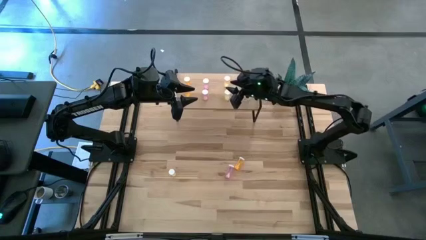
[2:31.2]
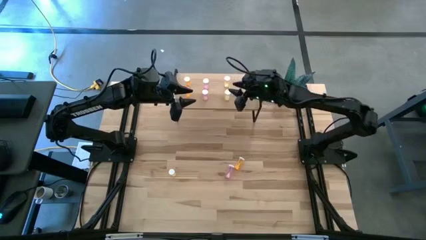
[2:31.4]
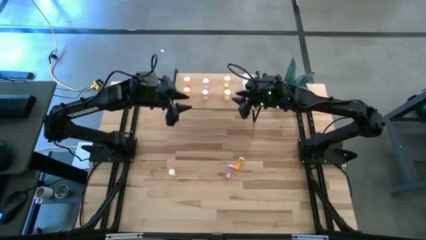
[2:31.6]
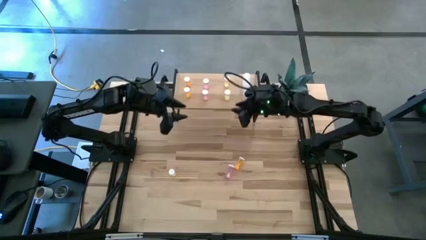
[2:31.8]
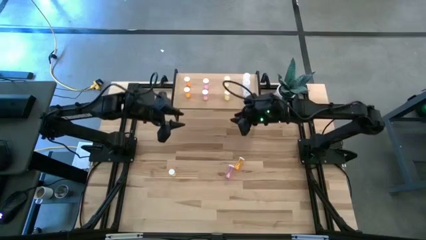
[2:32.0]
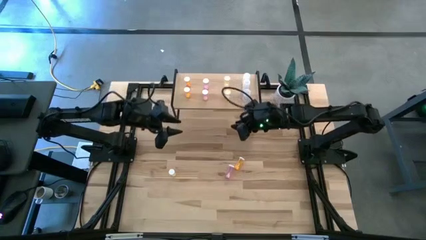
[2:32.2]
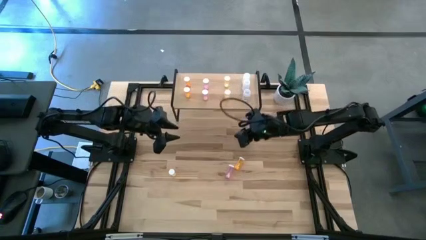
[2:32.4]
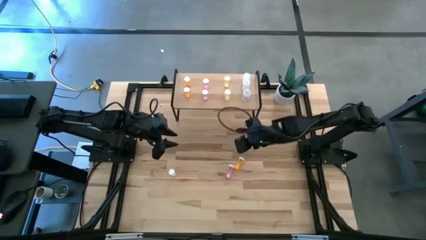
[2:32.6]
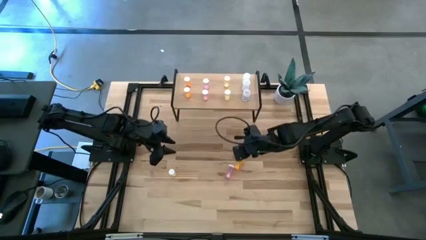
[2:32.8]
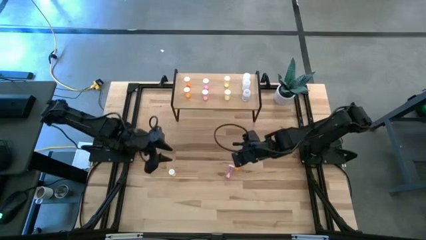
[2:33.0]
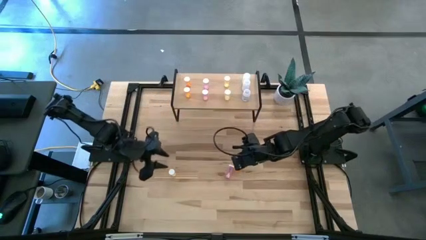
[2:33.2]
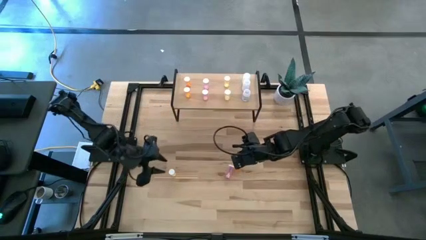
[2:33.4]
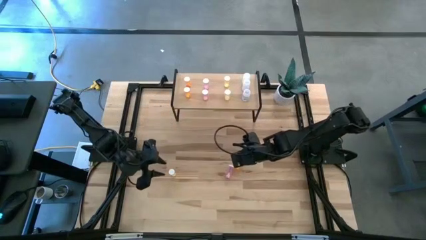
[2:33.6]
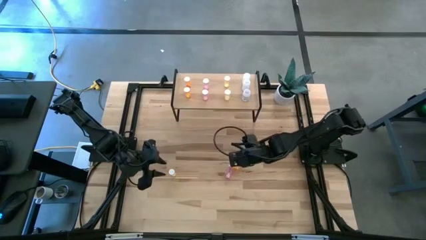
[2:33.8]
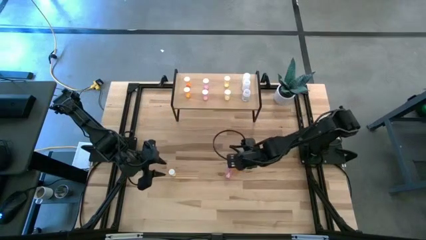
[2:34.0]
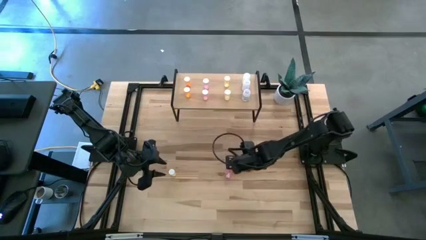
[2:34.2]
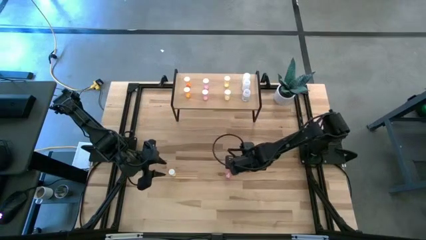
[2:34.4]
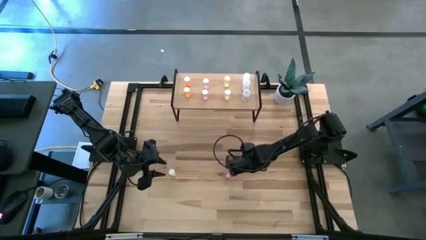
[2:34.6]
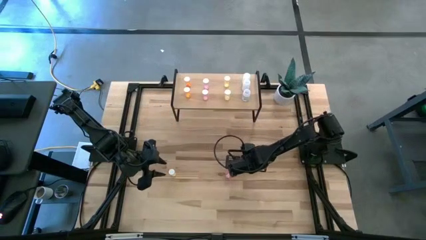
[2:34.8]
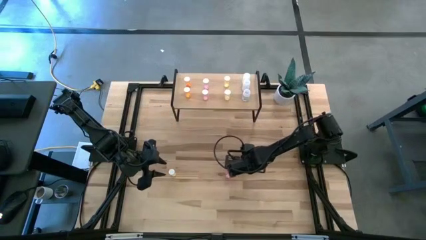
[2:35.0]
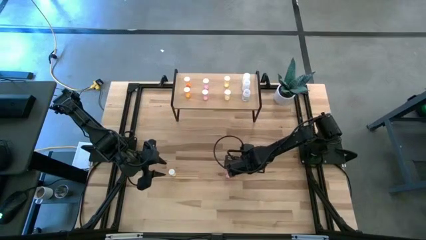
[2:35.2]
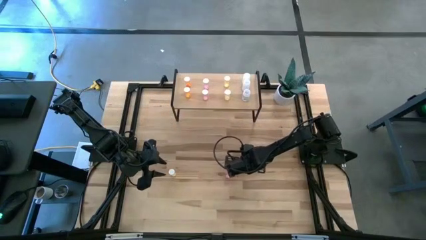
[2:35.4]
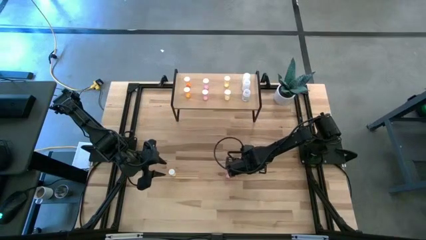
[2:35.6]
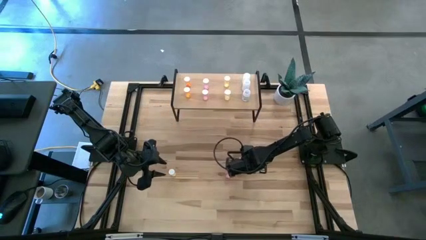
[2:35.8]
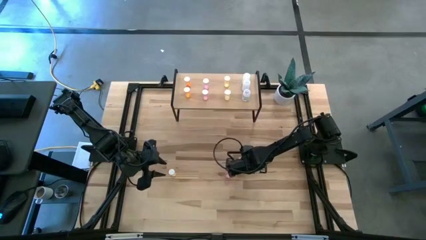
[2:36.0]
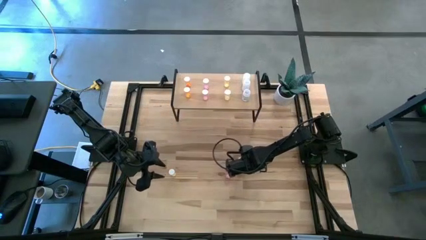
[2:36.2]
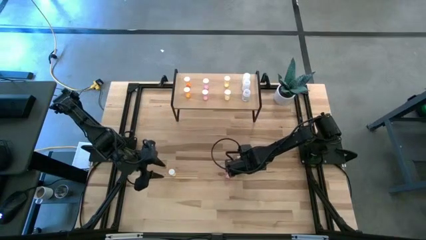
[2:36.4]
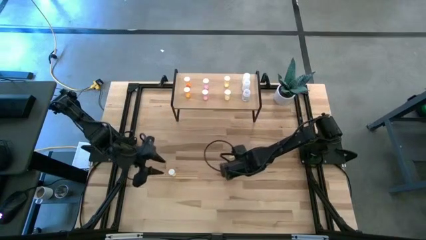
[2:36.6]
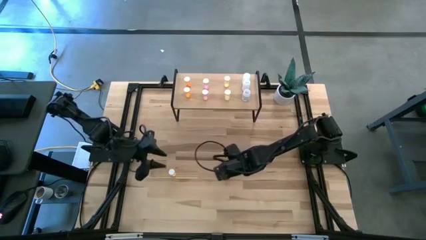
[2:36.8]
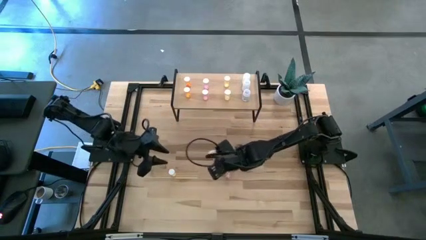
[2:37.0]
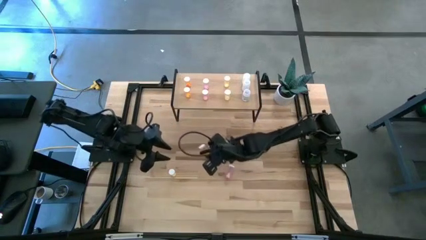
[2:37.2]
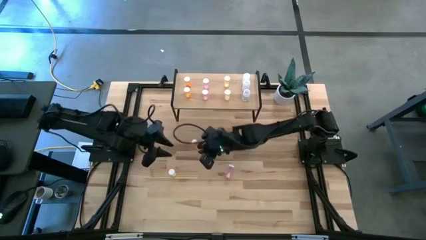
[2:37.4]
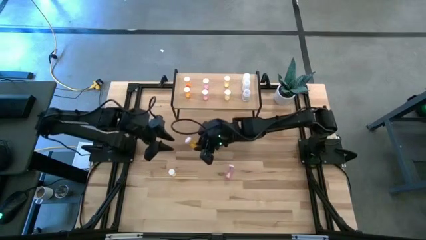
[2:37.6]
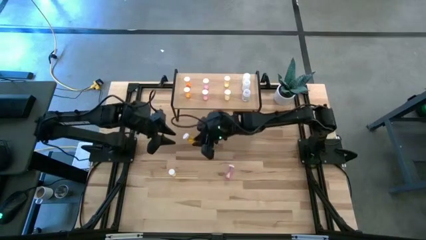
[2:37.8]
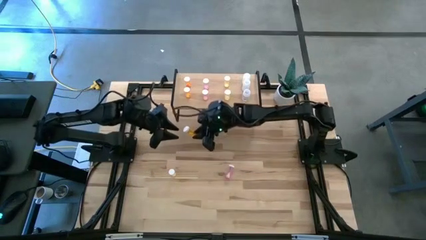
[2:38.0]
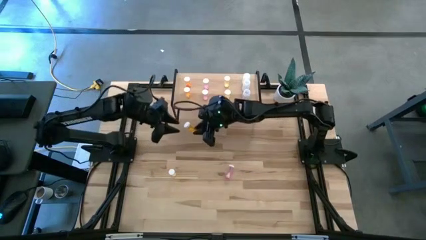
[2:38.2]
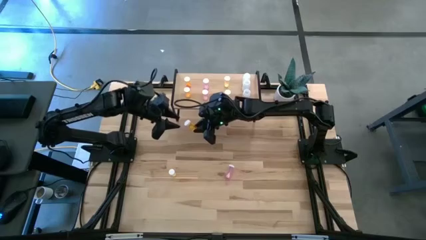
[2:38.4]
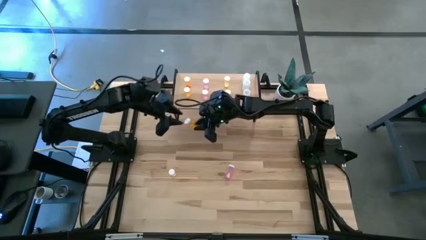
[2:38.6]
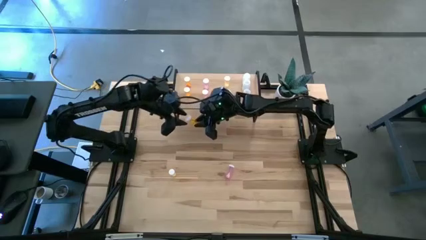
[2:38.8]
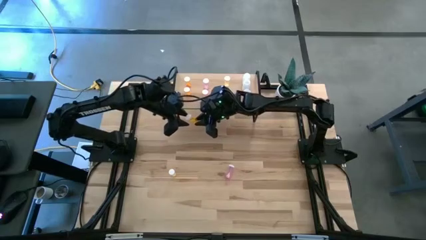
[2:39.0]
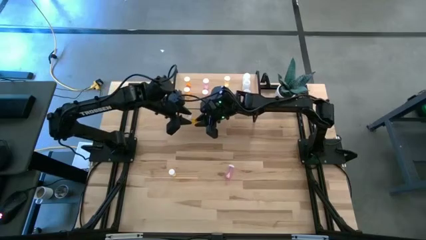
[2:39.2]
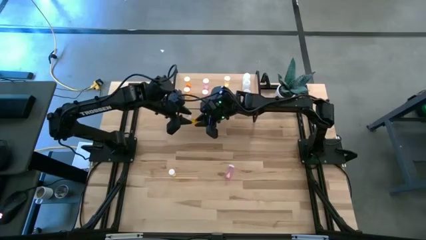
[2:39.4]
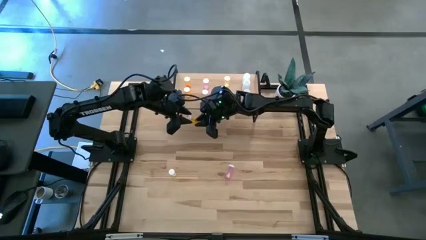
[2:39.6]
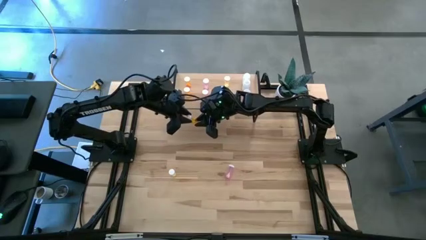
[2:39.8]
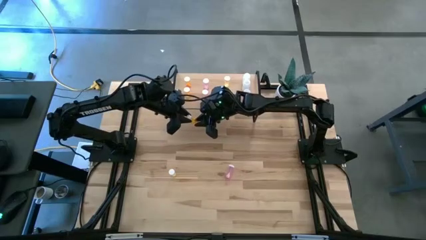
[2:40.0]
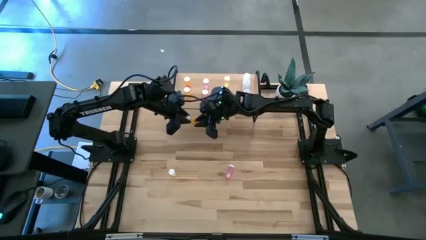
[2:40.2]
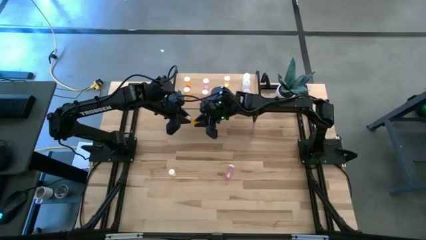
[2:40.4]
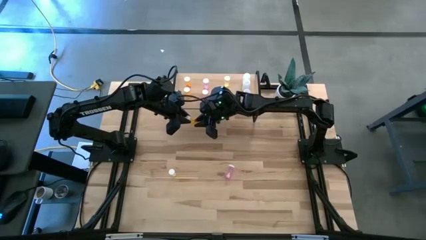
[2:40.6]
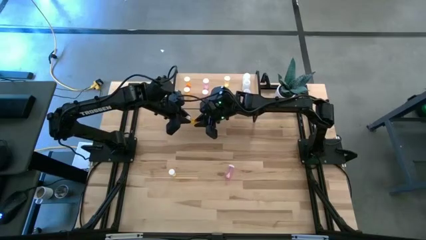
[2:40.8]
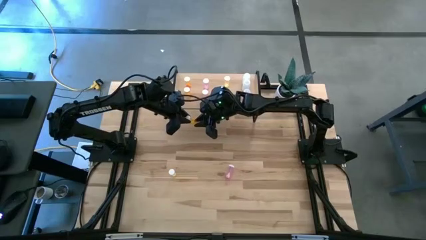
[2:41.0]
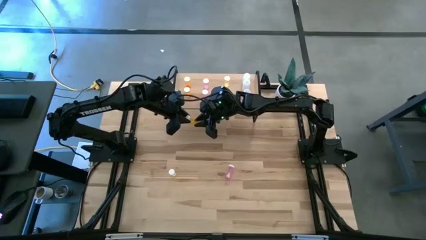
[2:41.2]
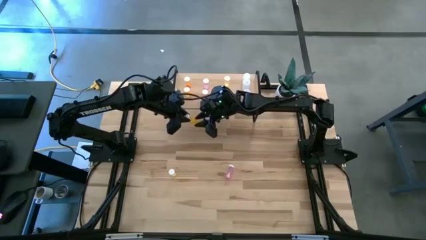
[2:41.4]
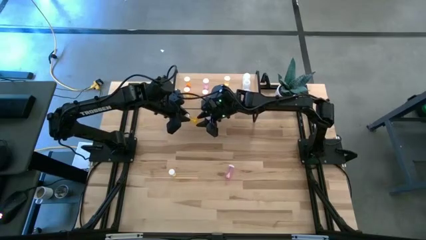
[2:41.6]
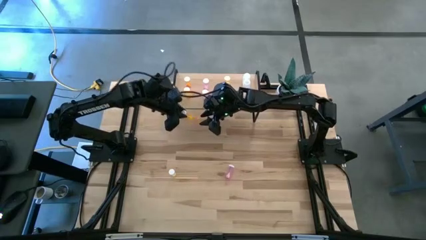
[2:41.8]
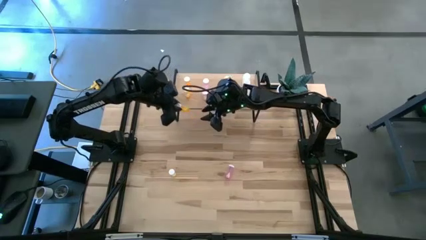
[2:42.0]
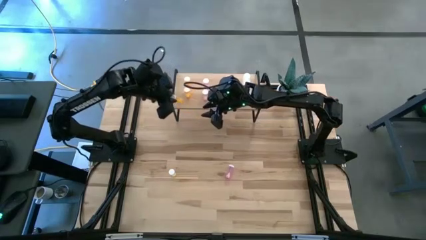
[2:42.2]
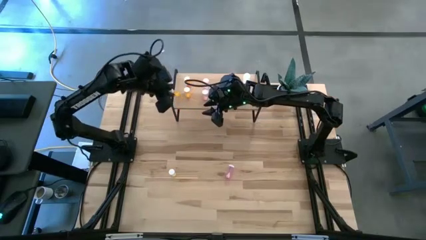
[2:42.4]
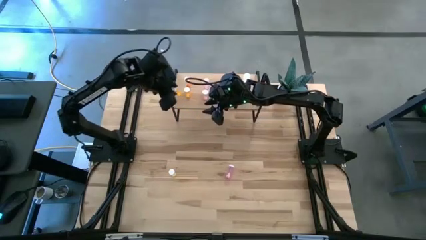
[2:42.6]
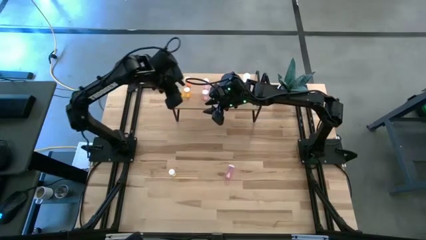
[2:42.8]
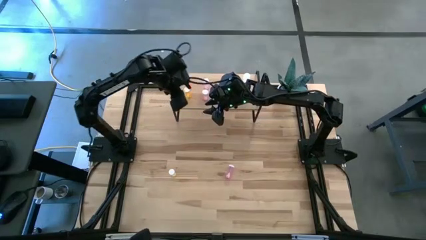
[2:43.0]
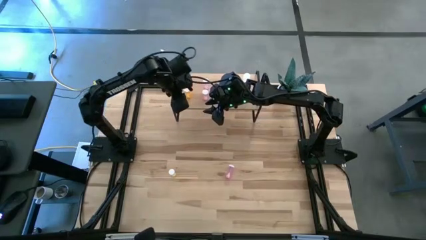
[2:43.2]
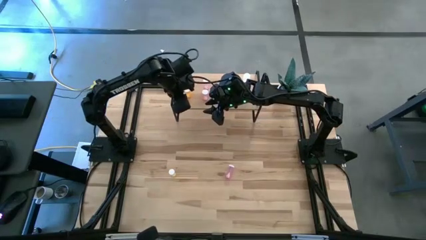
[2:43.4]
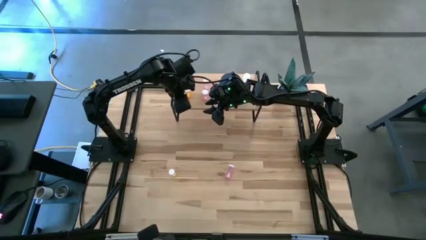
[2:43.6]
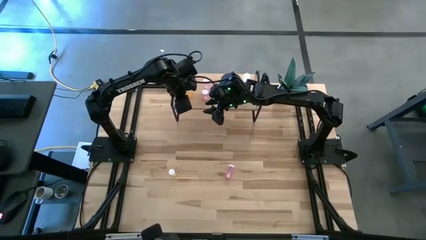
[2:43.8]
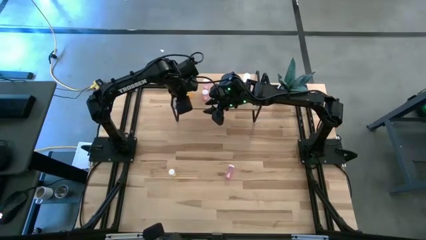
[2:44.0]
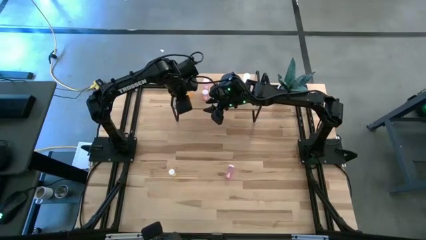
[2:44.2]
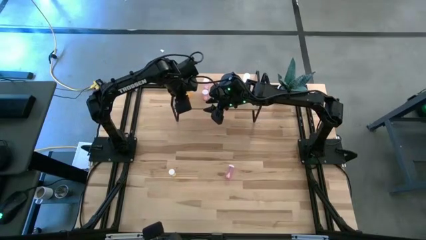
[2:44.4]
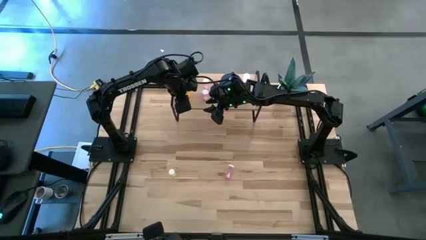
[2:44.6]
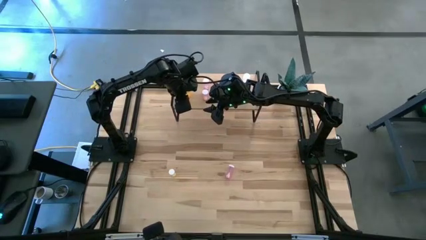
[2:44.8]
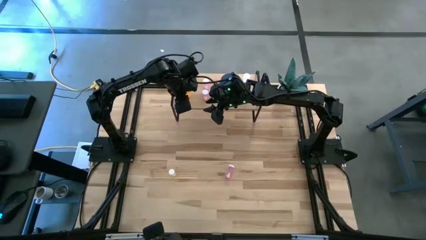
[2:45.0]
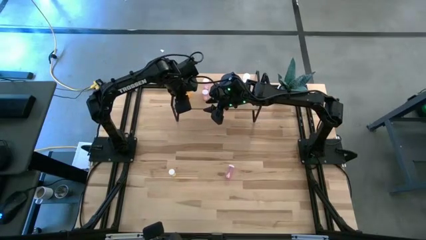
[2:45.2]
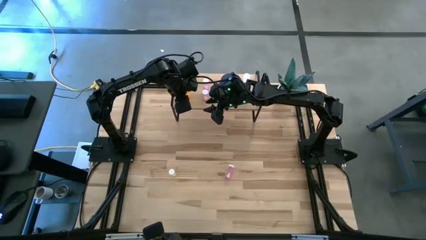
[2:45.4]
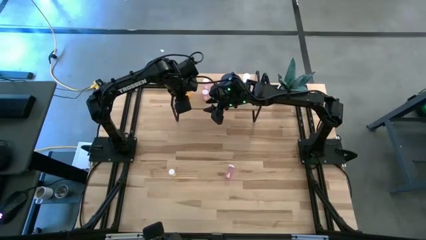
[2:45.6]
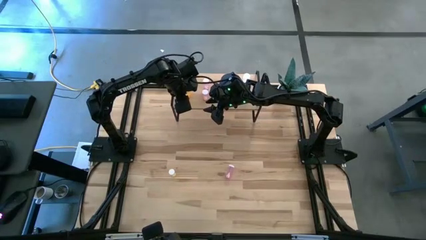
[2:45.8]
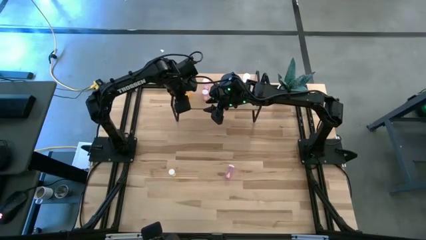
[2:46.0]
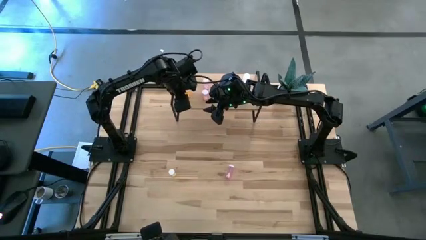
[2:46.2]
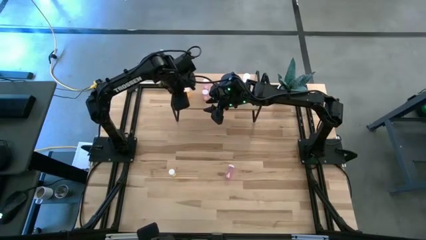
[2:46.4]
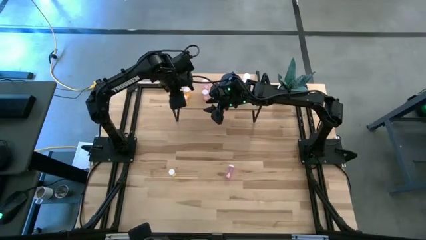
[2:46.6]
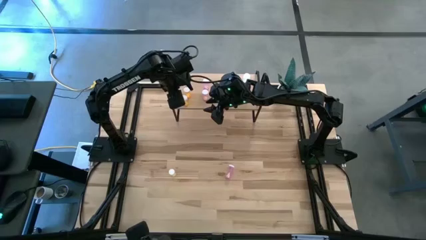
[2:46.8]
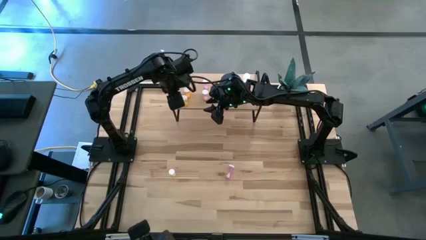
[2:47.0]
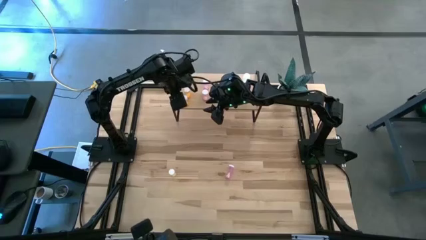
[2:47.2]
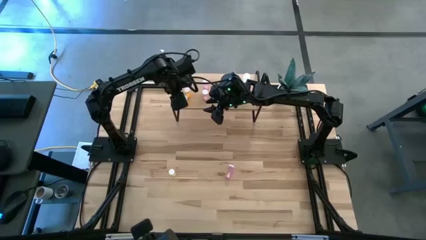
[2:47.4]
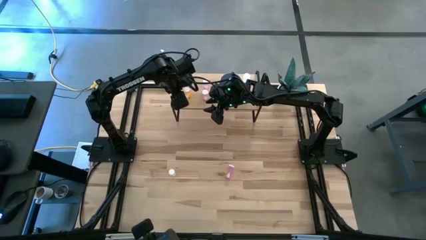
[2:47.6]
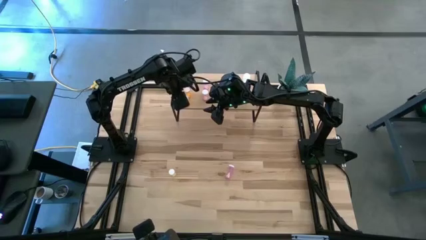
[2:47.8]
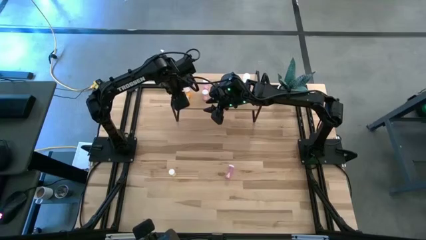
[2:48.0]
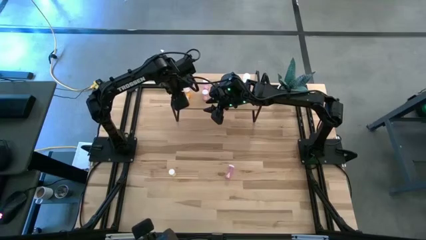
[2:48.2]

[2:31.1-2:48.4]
Task: Pick and place medicine bottles onto shelf by color
Put the orange pill bottle on the shelf aligned with the other orange pill bottles
